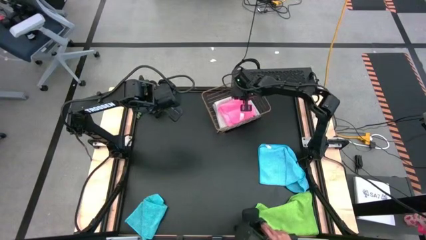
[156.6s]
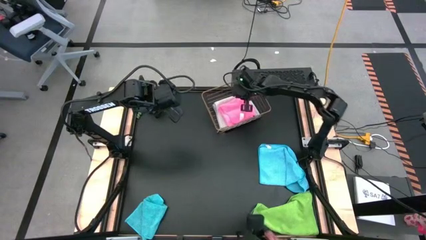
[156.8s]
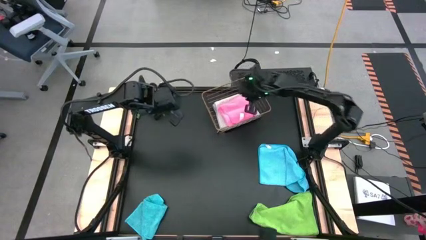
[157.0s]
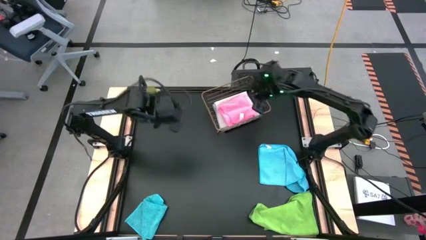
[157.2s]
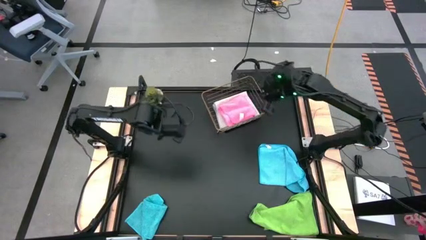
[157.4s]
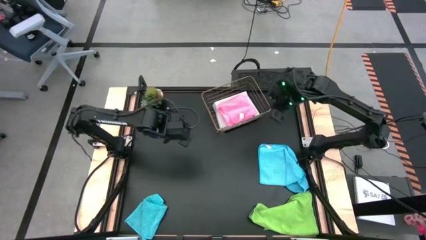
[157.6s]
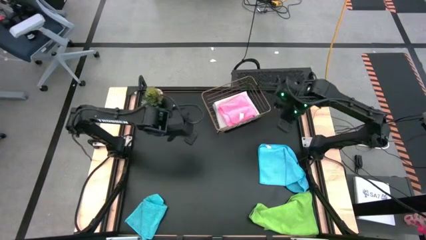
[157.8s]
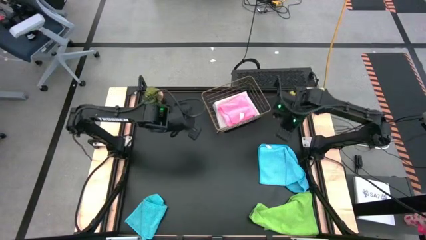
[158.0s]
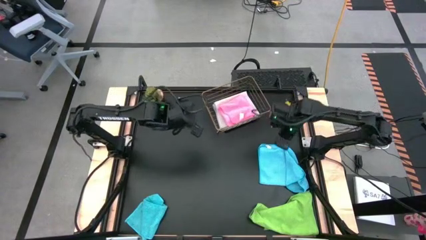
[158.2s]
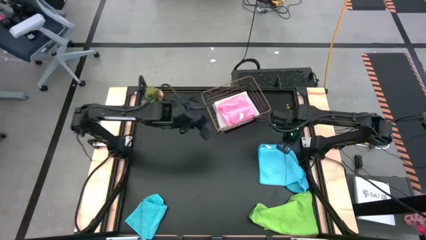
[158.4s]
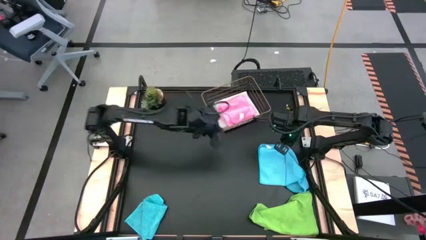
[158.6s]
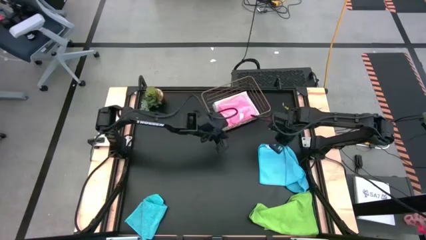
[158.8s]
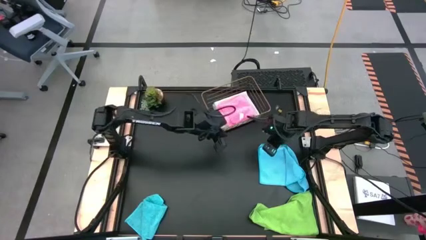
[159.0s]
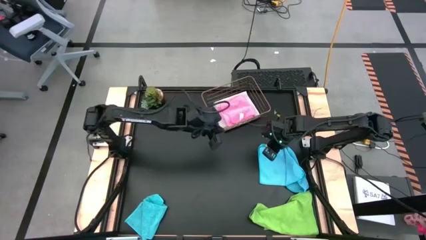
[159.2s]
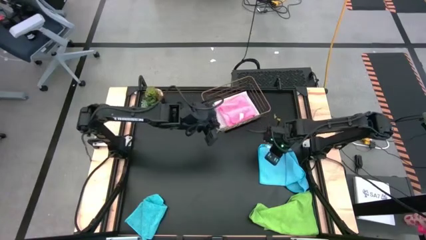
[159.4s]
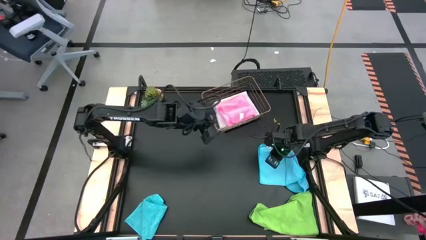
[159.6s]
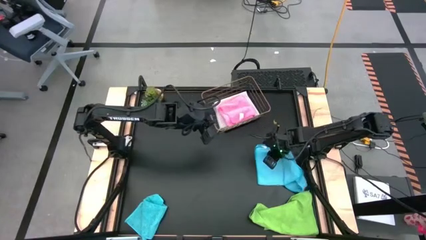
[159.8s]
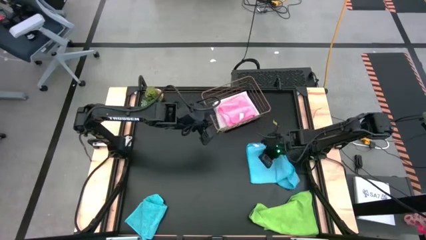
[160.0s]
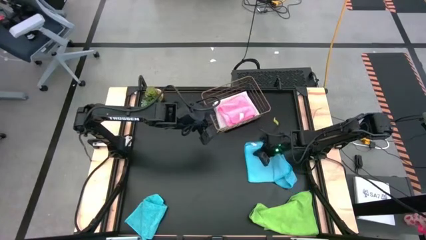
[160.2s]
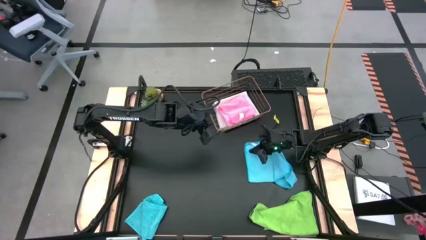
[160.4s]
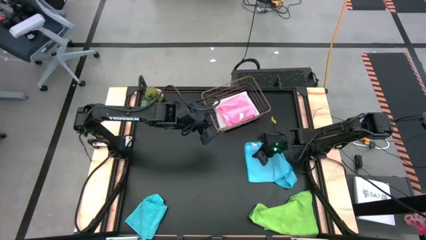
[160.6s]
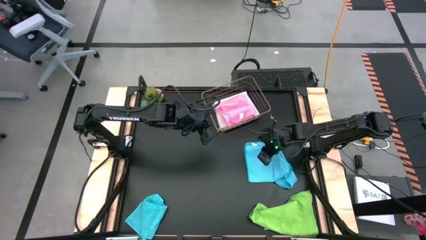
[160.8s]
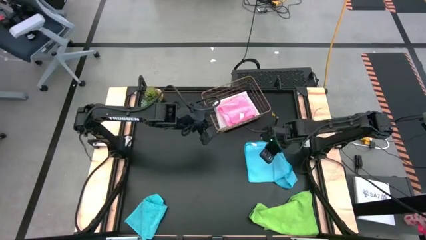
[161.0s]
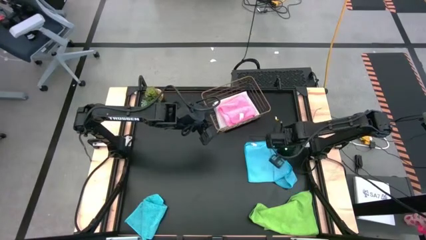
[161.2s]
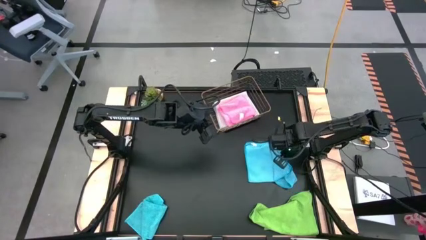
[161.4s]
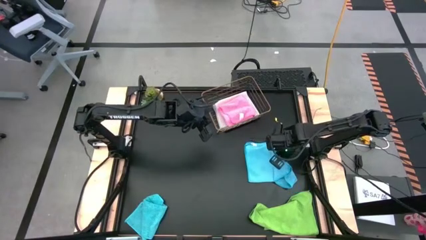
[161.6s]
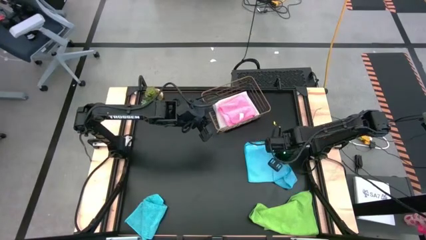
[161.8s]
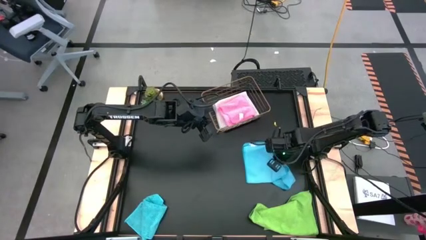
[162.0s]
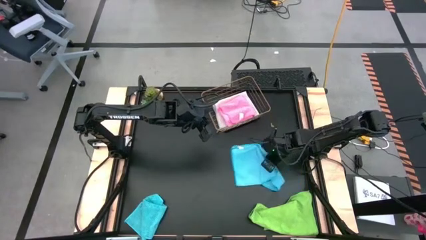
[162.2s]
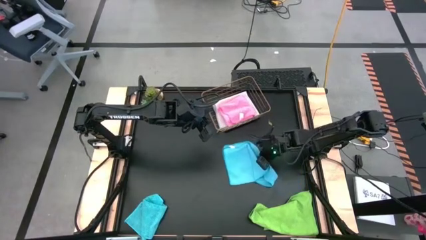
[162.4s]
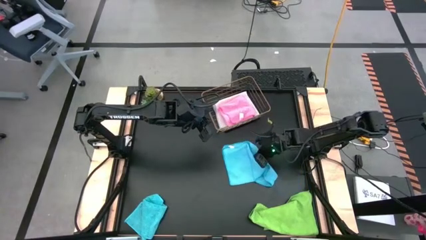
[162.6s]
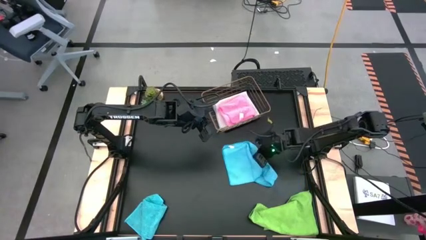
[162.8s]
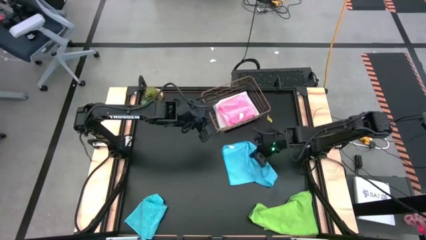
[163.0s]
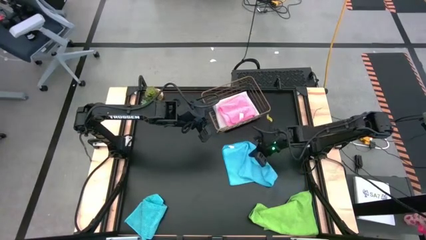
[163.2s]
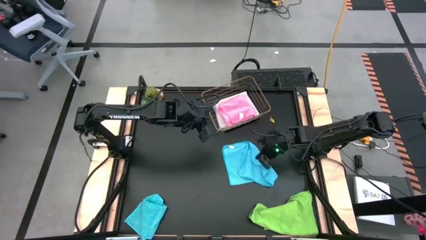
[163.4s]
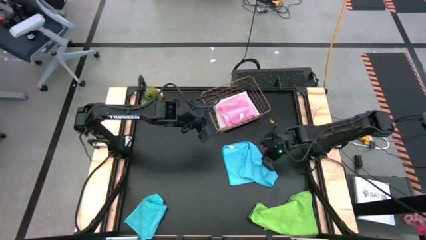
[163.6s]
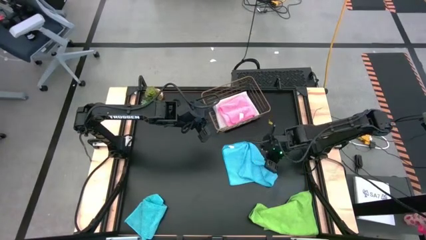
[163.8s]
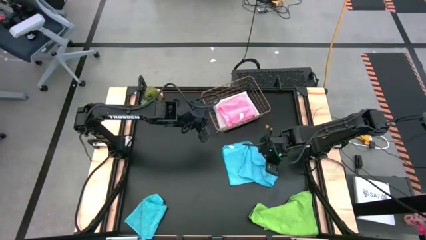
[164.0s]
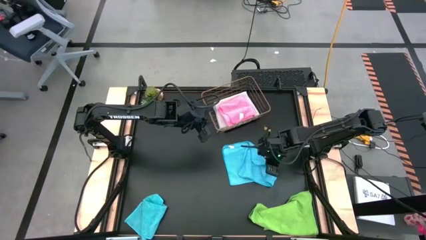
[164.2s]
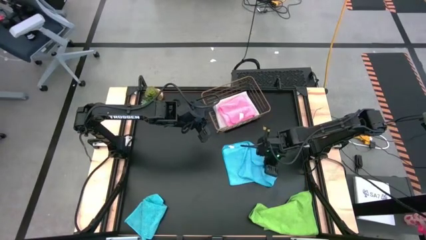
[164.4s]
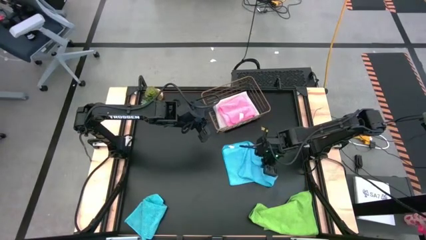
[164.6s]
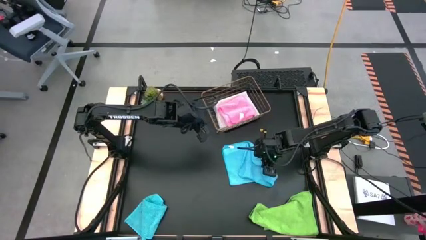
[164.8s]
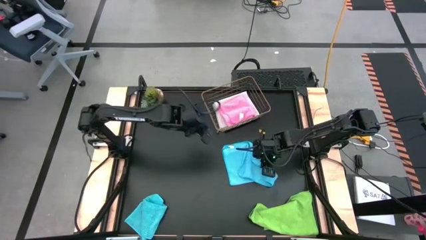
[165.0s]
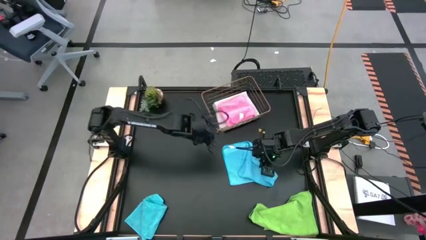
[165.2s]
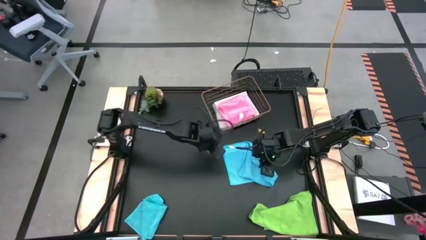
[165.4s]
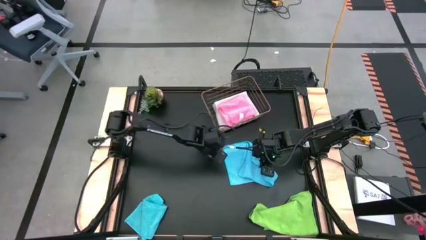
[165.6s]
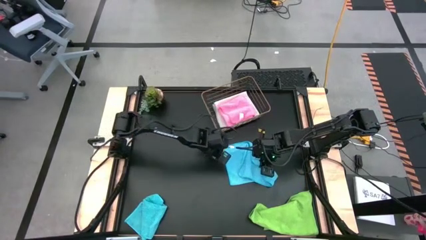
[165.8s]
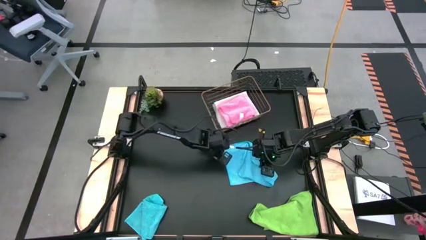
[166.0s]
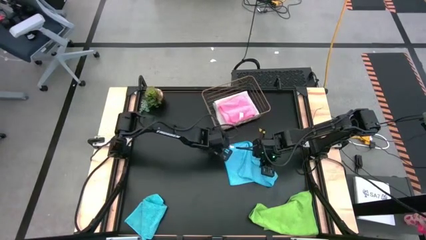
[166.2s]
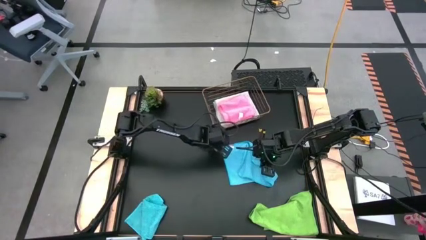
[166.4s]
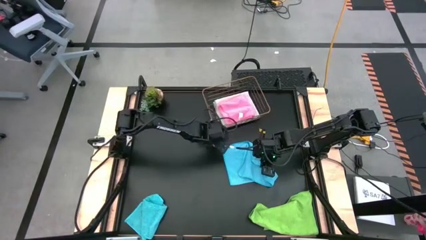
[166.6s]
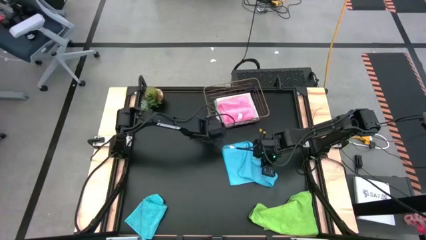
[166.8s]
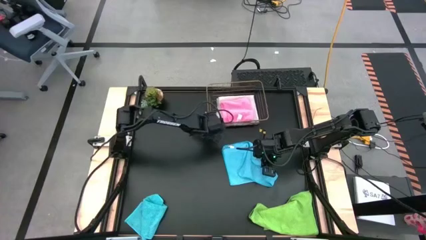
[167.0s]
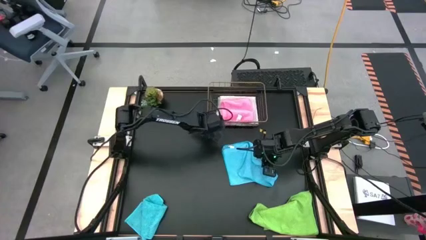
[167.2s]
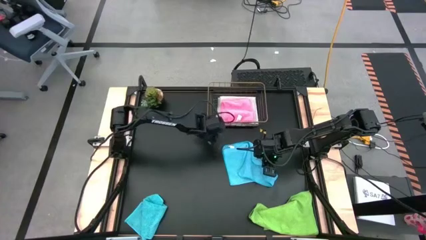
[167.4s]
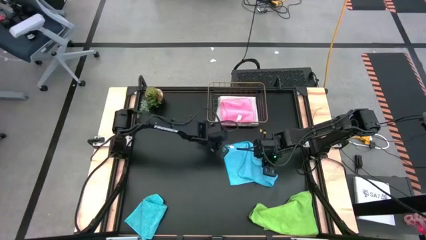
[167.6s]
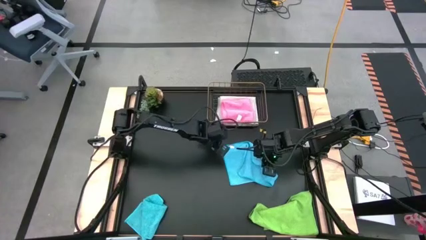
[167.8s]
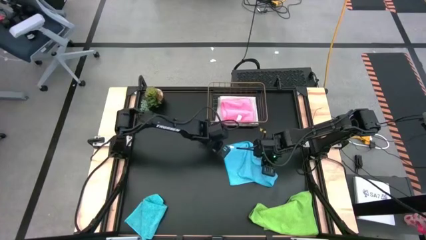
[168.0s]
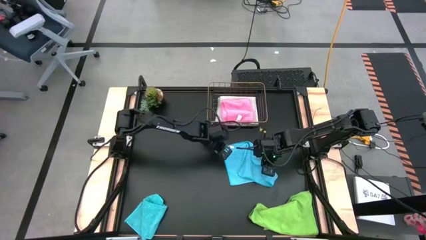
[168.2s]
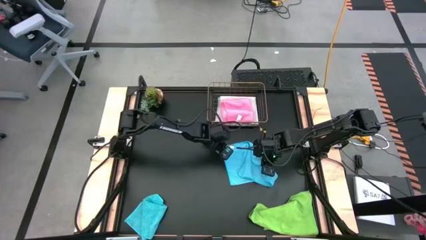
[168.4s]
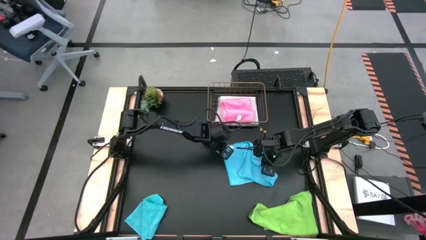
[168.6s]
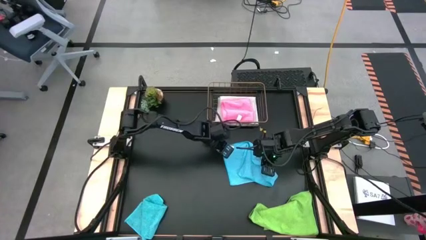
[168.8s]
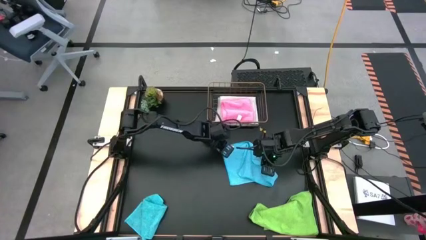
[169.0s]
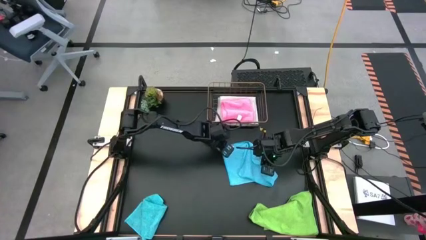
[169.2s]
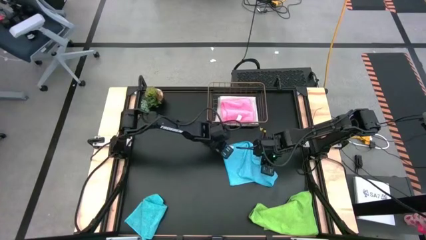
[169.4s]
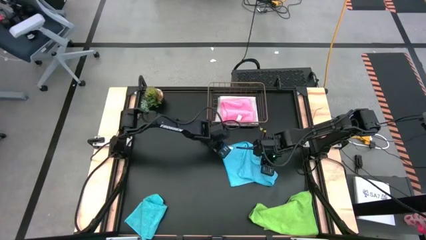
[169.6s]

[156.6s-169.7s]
Task: Fold microfiber towels
Fold the right blue towel

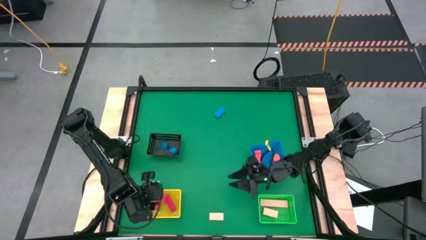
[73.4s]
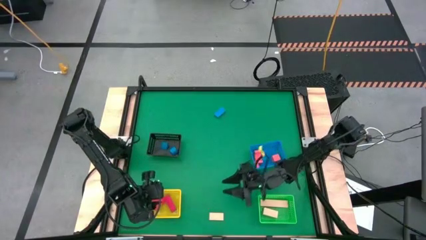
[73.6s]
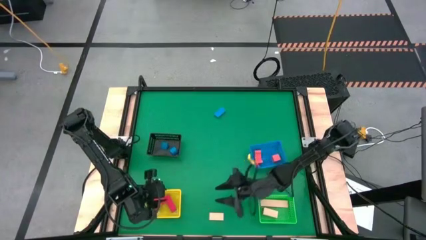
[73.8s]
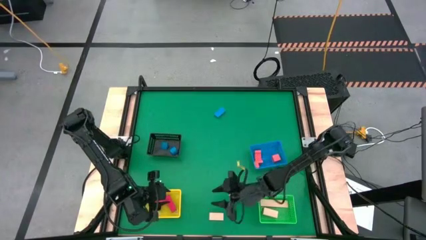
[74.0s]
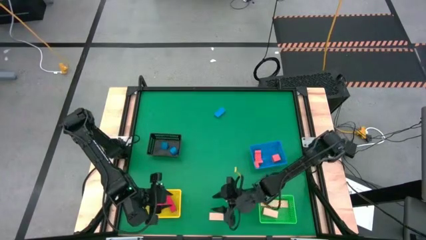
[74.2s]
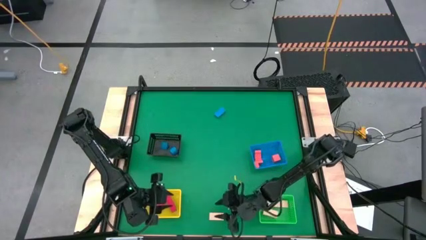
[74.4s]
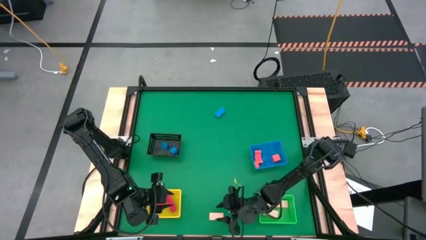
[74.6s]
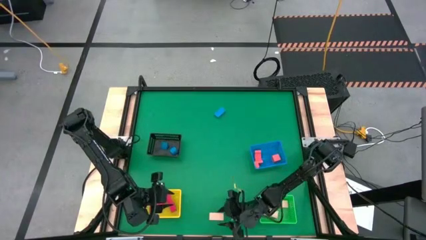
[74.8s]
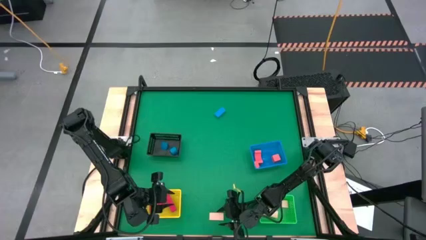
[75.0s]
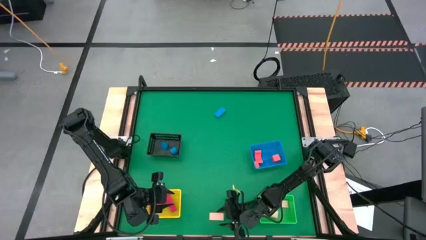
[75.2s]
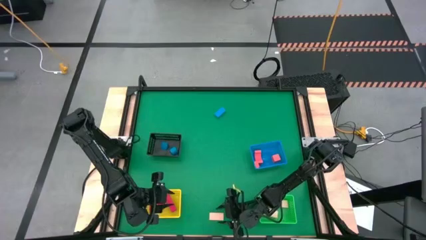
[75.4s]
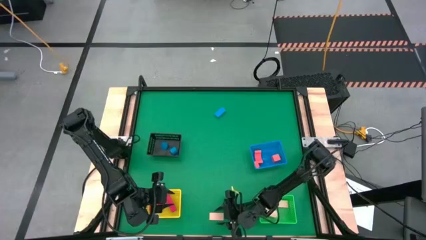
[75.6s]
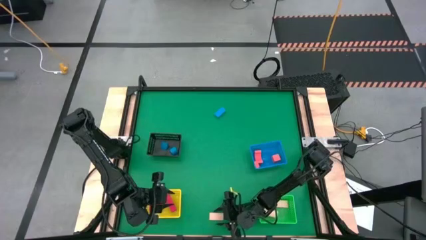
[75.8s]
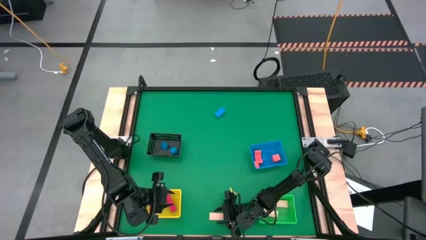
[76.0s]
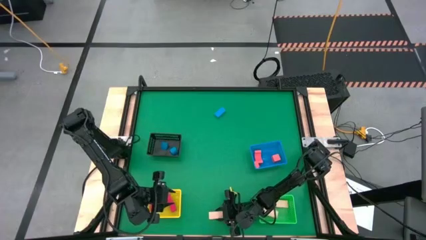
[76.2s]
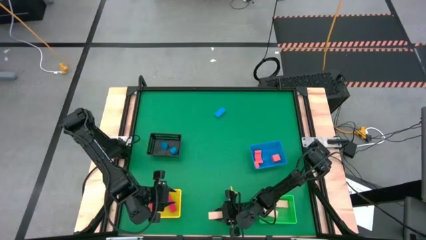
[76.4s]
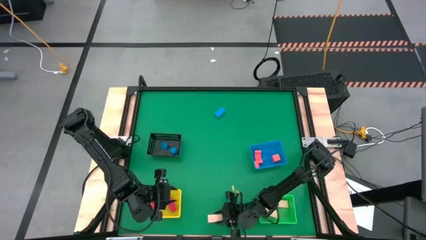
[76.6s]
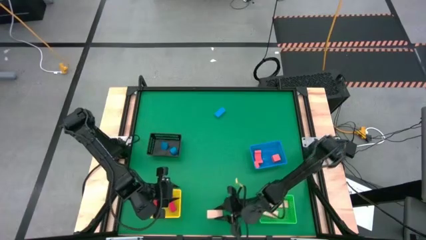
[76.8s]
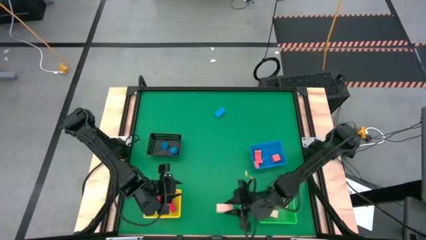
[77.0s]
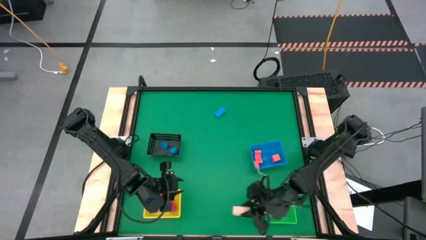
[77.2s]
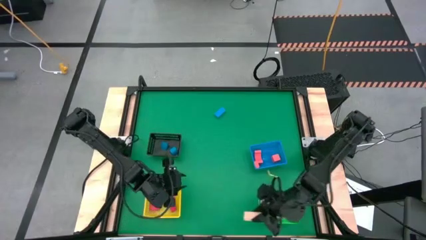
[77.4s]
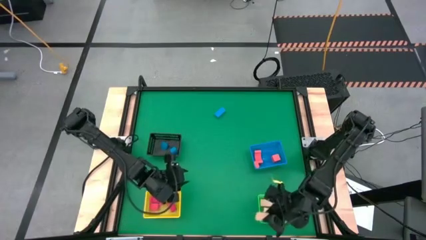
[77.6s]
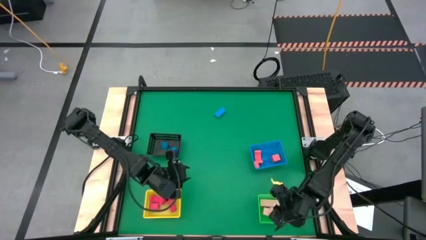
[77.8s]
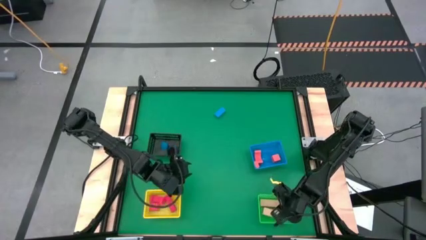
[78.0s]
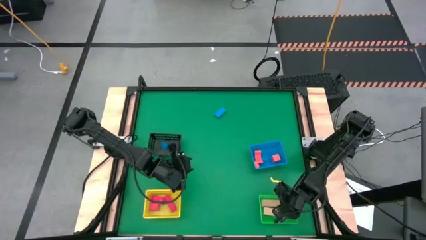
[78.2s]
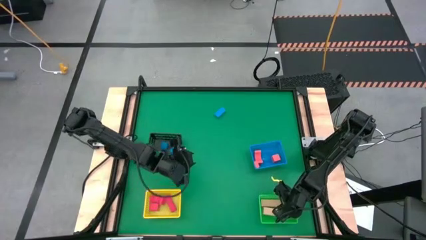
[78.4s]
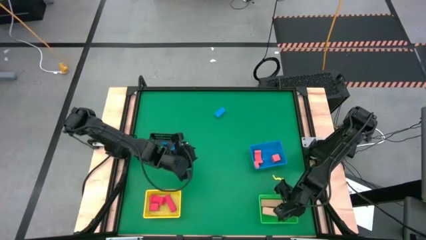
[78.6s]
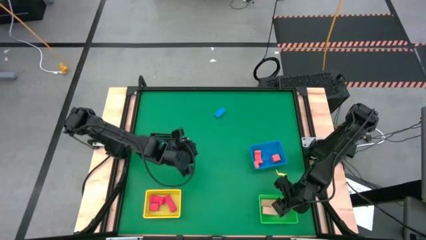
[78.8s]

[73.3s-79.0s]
Task: Sort & place blocks by color
Put the brown block into the green bin
